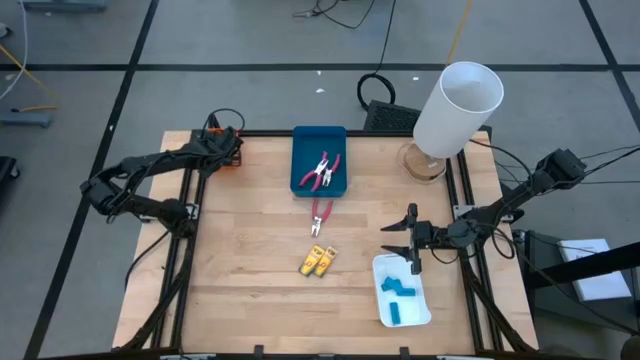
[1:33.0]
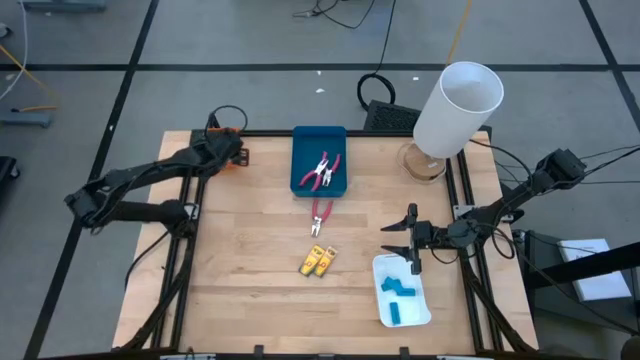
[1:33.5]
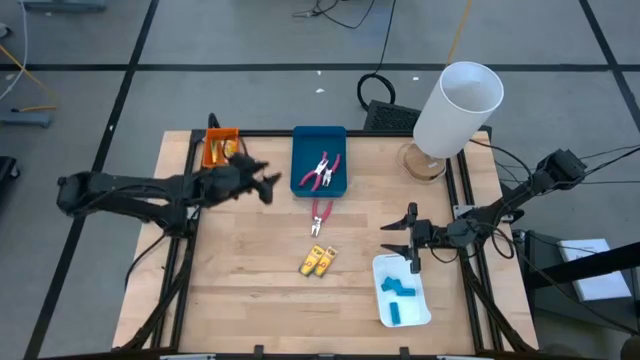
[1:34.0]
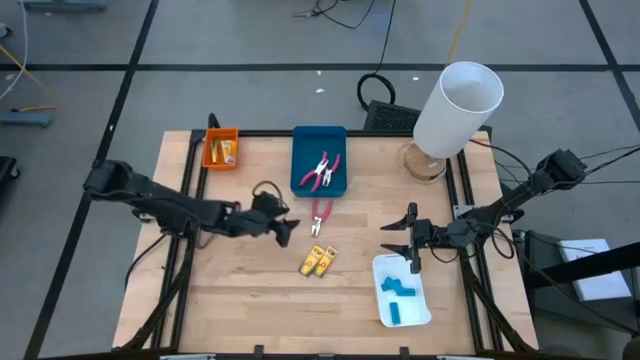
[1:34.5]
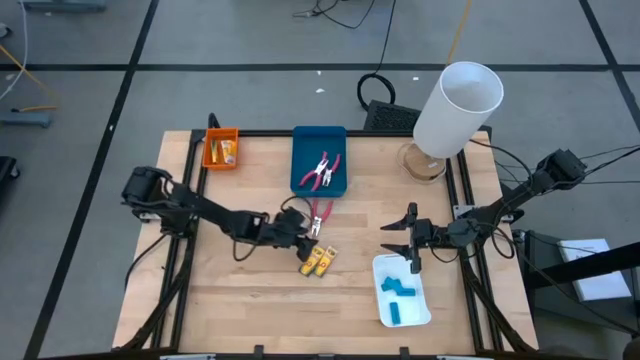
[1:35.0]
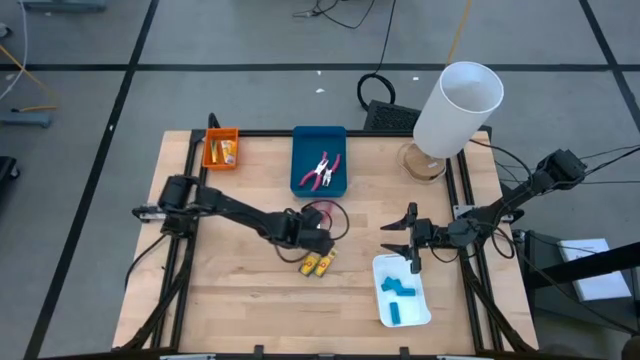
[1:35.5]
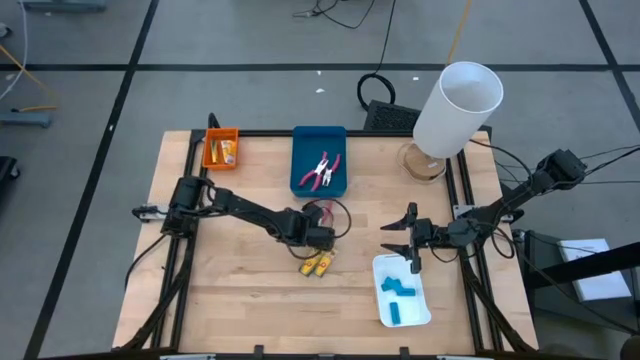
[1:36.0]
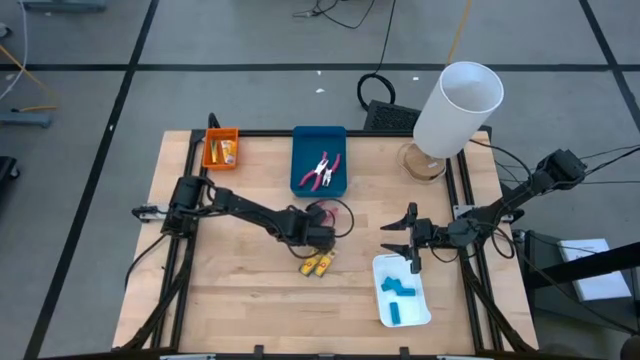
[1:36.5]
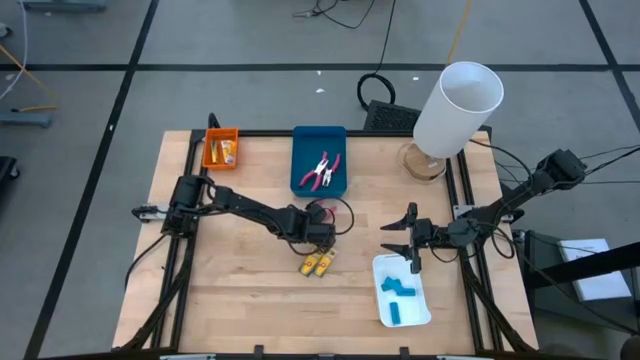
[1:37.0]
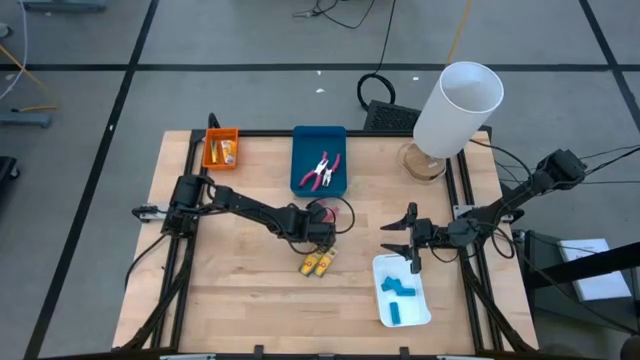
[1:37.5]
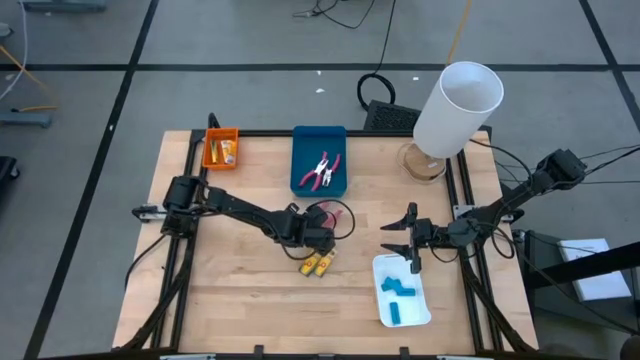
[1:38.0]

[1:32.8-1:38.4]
Task: Pick & Place School Supplies
Put the pink hole puncher into the blue bin

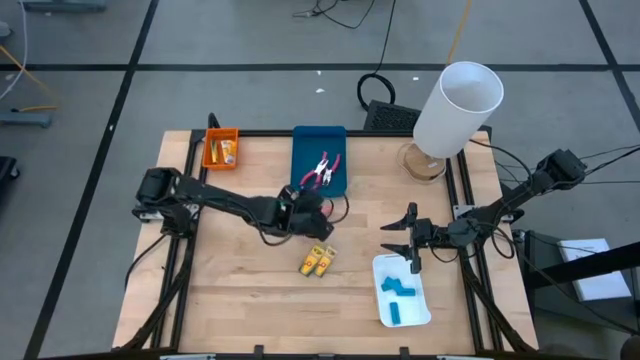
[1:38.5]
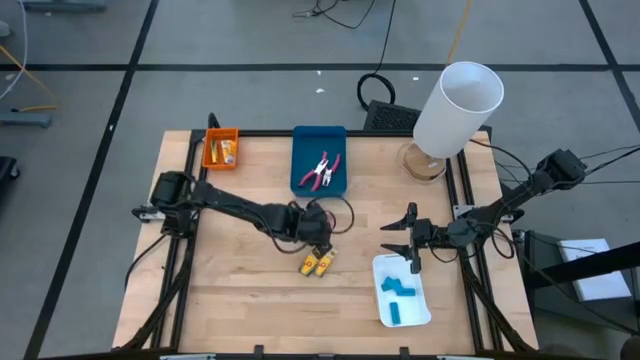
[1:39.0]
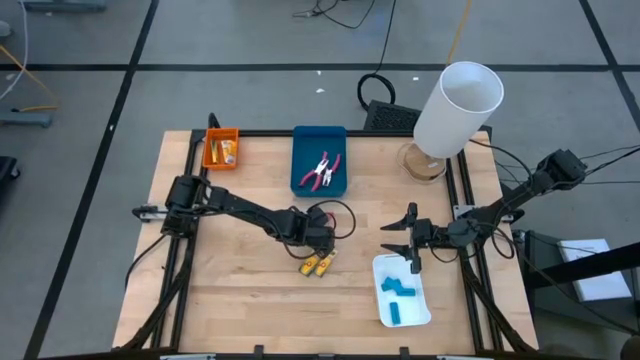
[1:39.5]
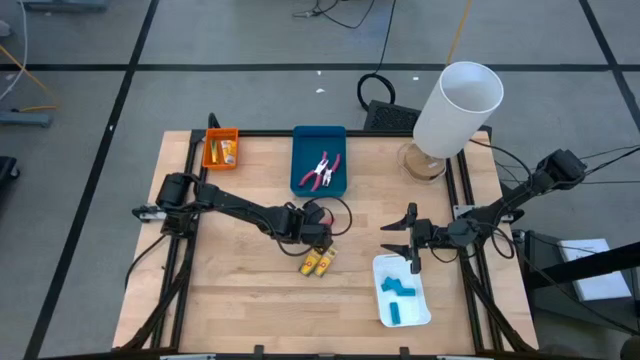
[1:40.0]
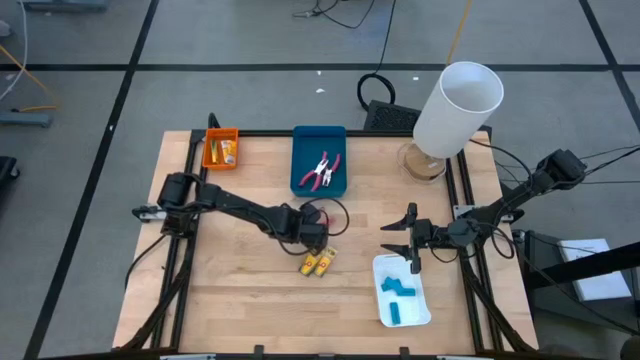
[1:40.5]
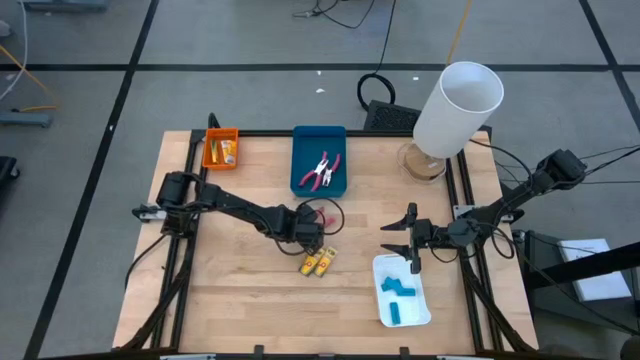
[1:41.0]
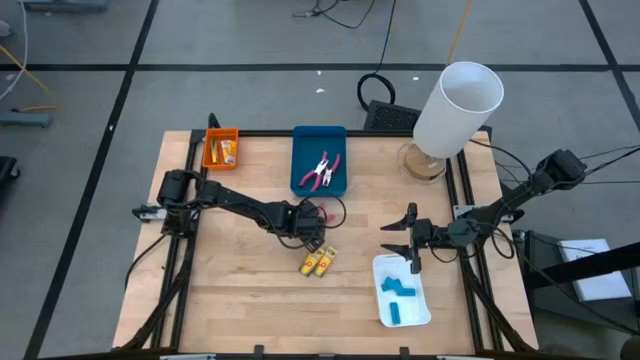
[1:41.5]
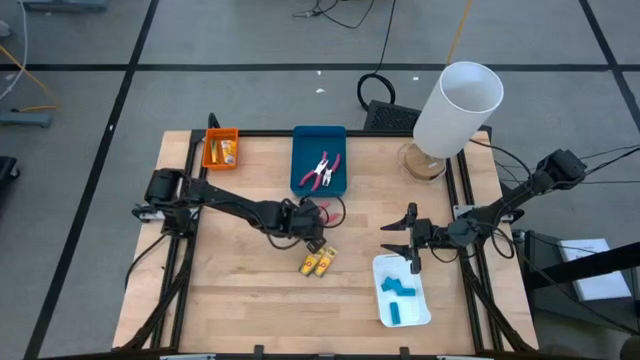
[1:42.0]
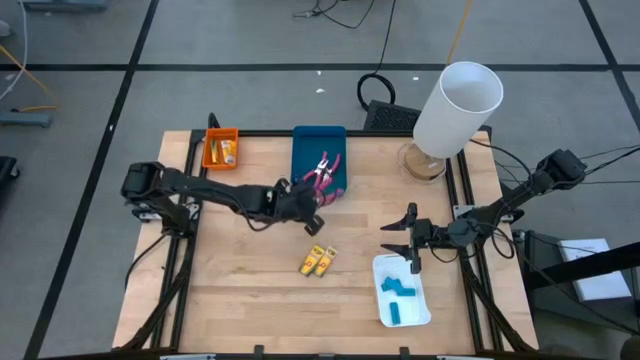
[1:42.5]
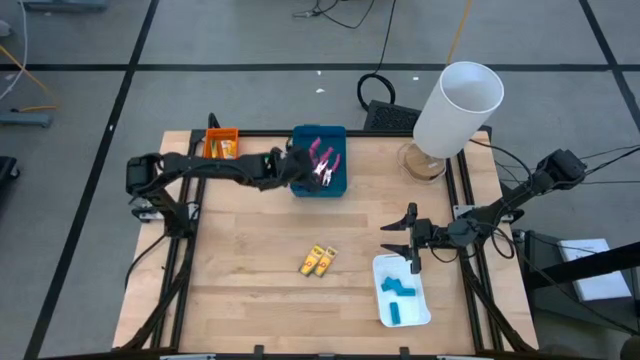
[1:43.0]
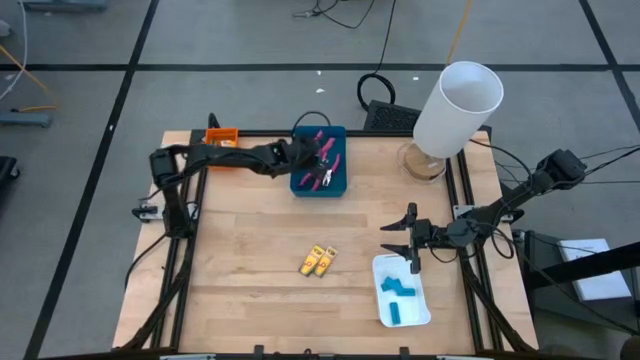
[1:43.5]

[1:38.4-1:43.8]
Put the pink hole puncher into the blue bin

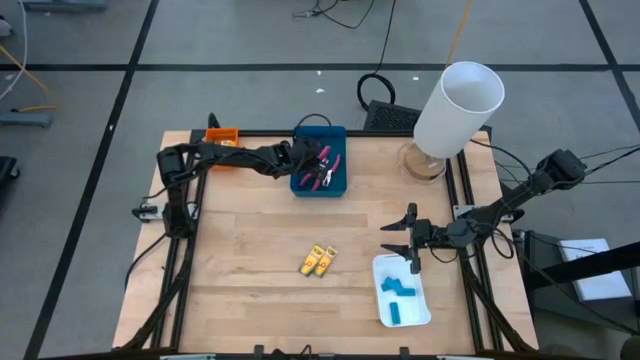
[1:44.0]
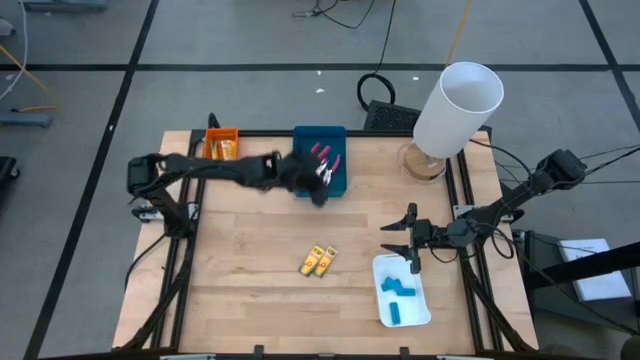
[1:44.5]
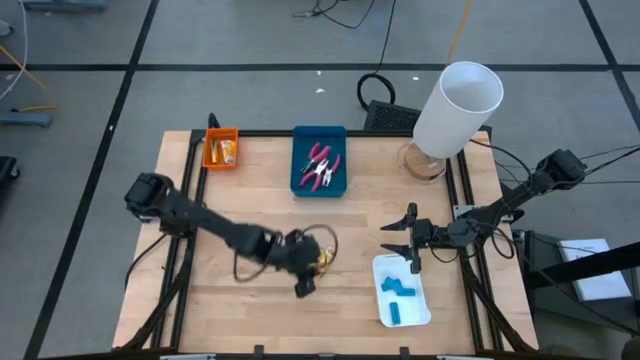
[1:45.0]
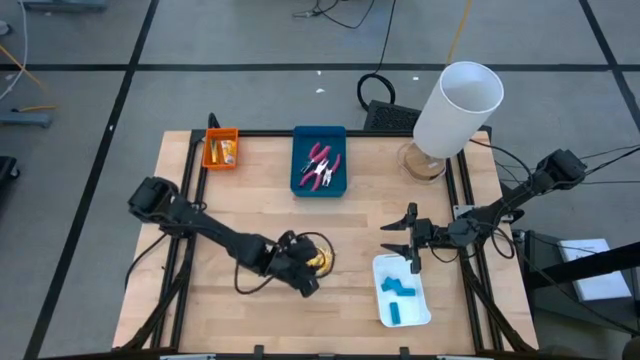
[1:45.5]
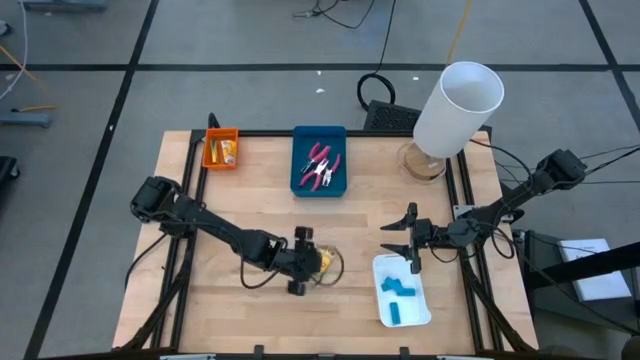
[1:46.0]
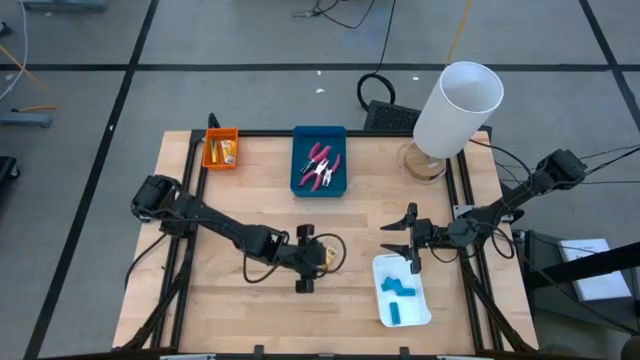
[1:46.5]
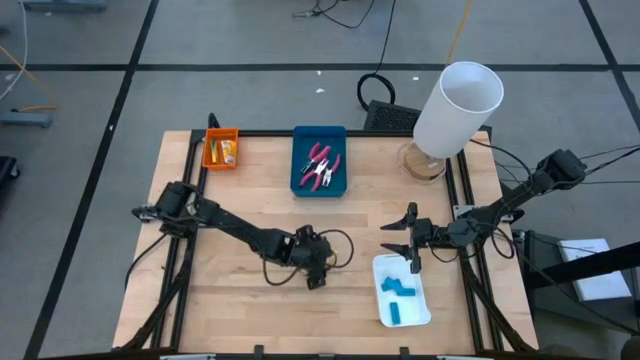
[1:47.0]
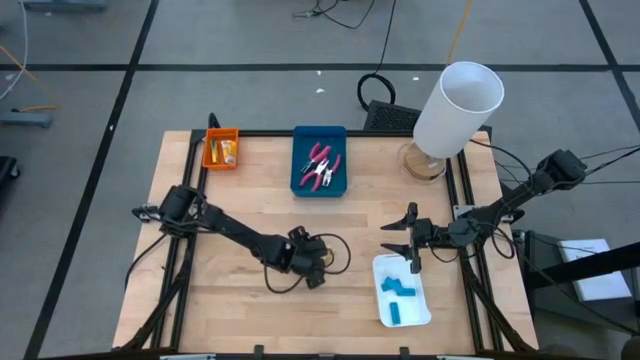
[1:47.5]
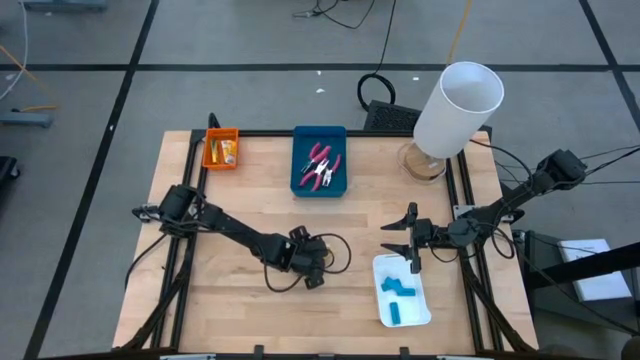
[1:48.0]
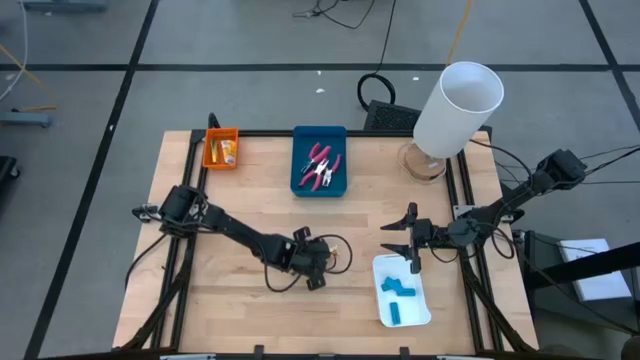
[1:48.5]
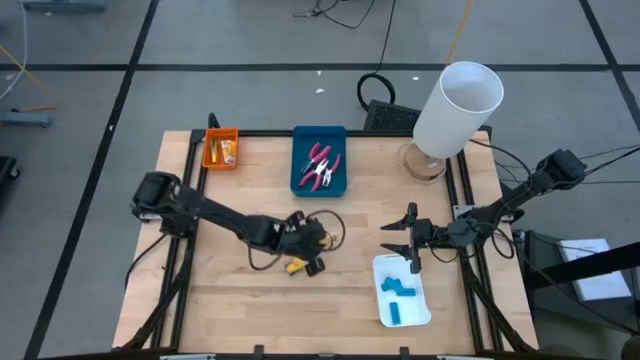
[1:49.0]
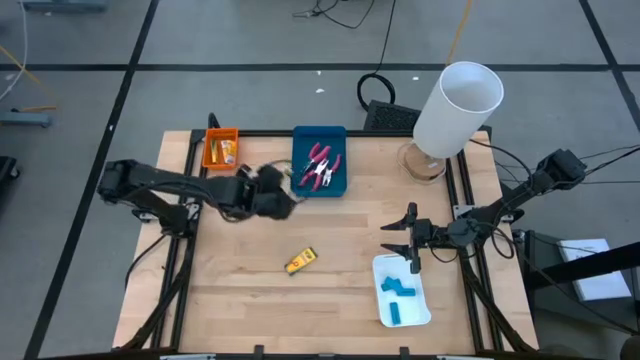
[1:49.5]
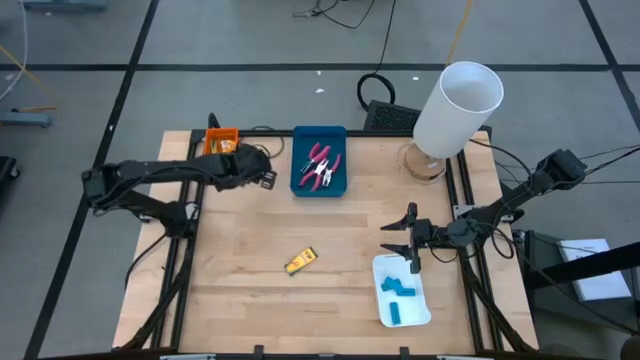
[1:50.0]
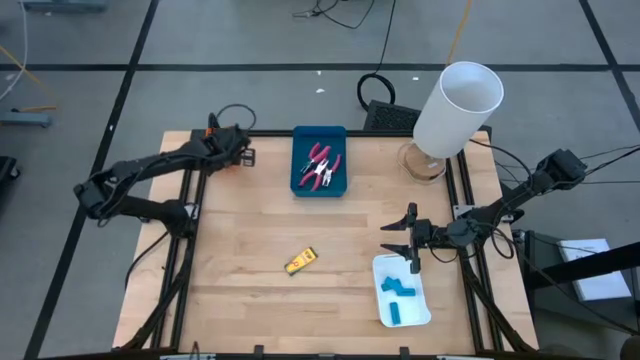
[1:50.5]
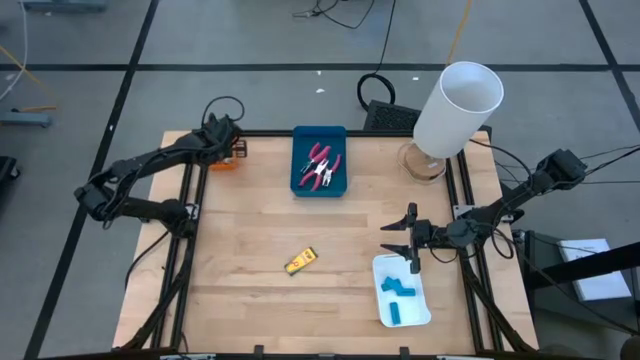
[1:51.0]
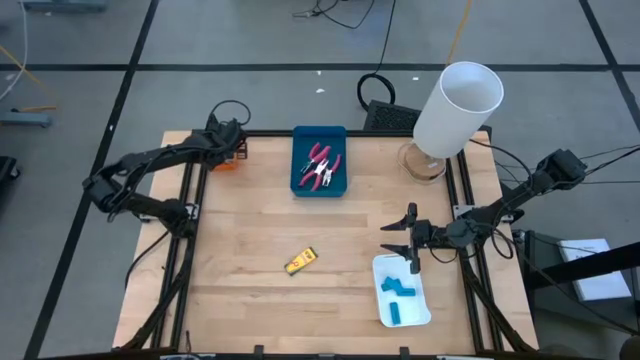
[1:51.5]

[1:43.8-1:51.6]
Put the yellow crayon pack into the orange bin

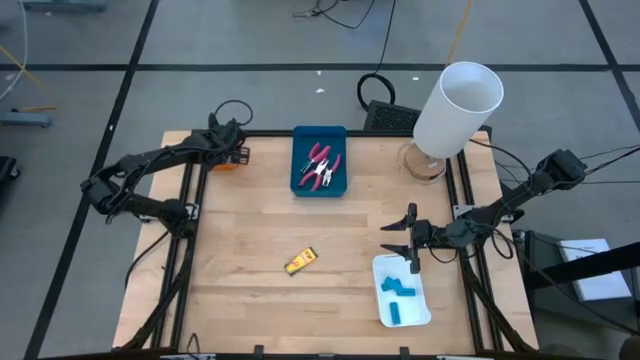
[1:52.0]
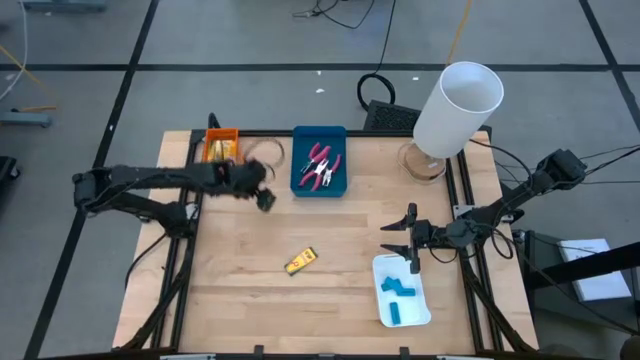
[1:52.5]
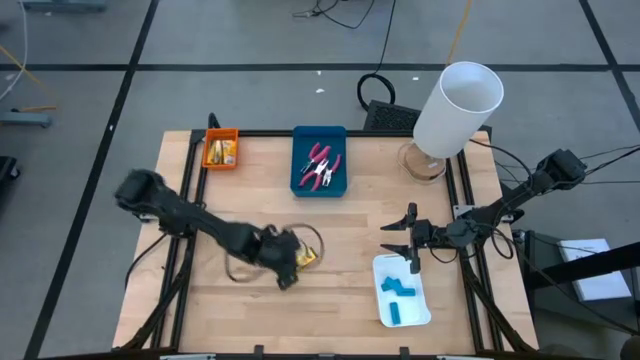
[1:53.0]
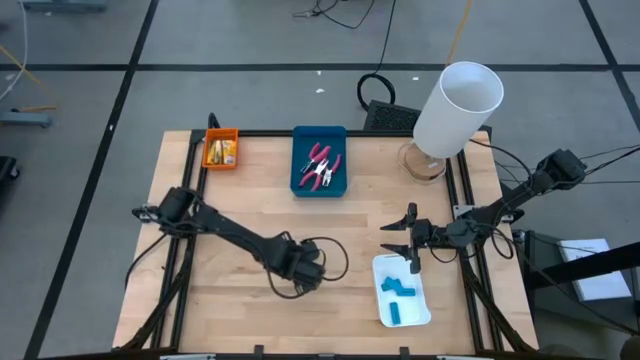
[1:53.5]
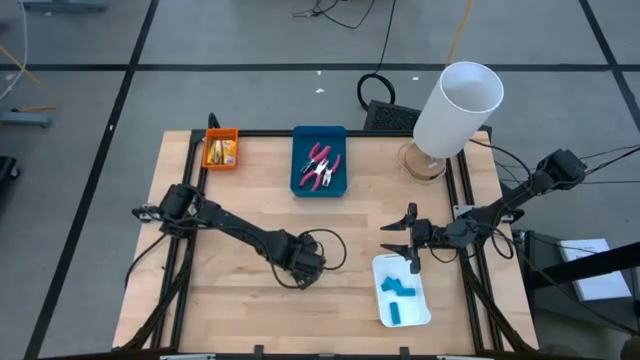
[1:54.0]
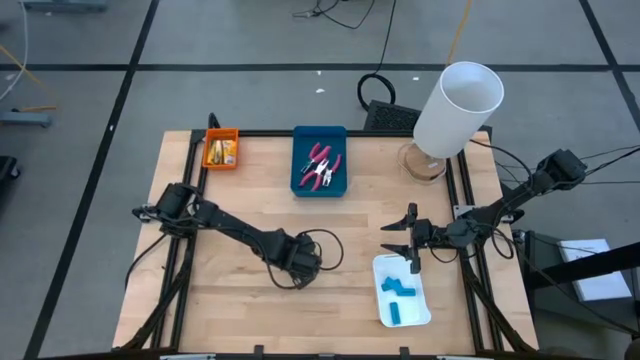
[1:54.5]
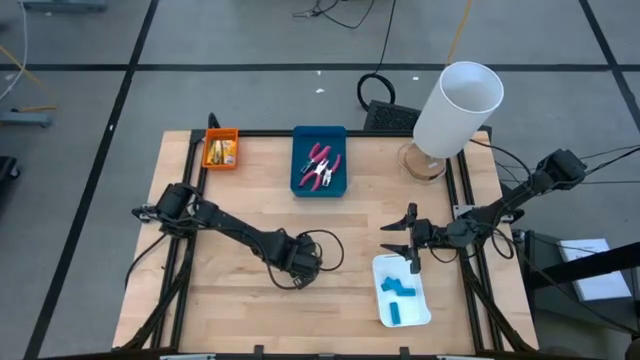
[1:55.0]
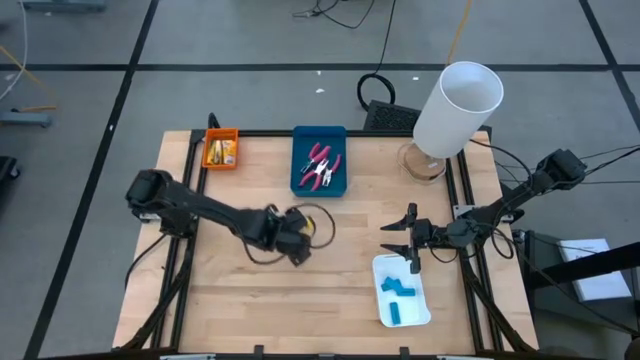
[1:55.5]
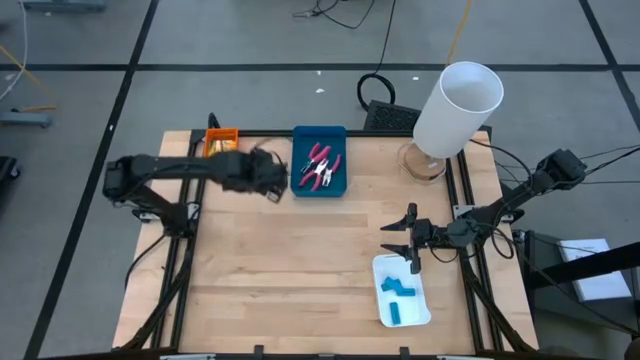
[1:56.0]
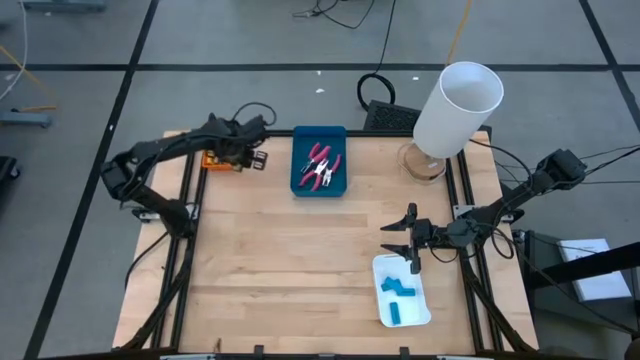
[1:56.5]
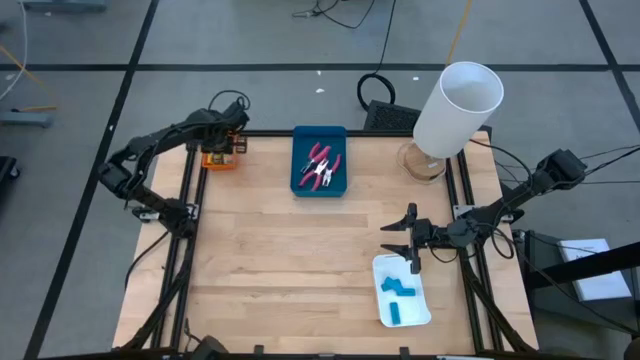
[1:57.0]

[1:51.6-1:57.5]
Put the yellow crayon pack into the orange bin
